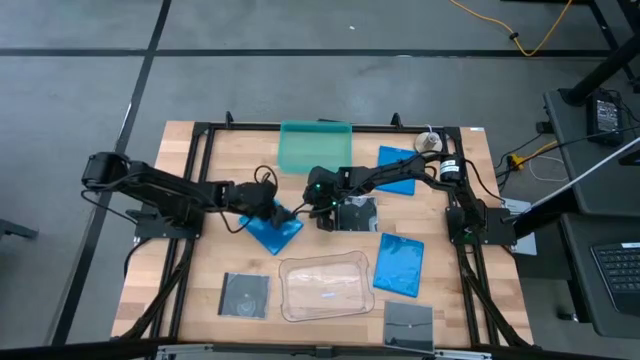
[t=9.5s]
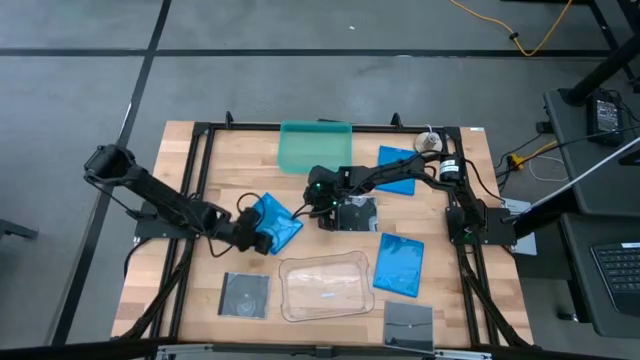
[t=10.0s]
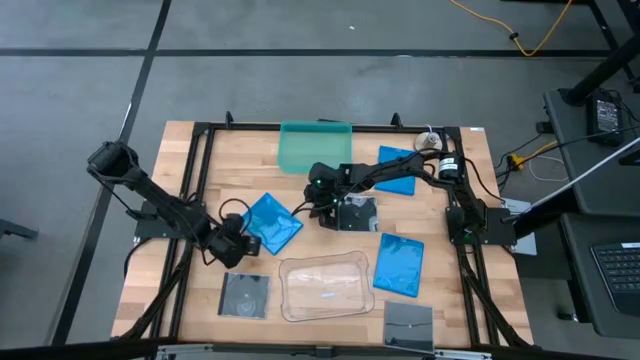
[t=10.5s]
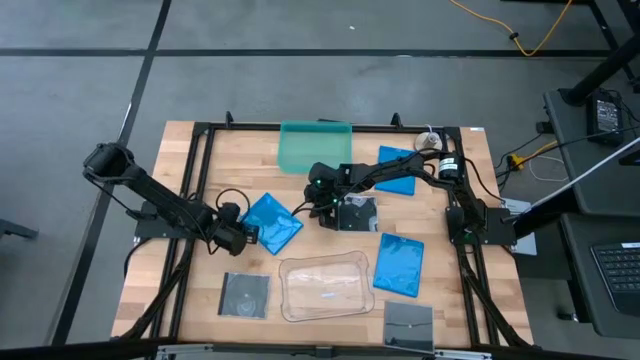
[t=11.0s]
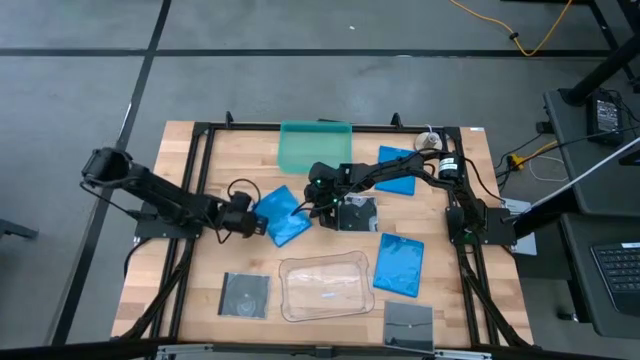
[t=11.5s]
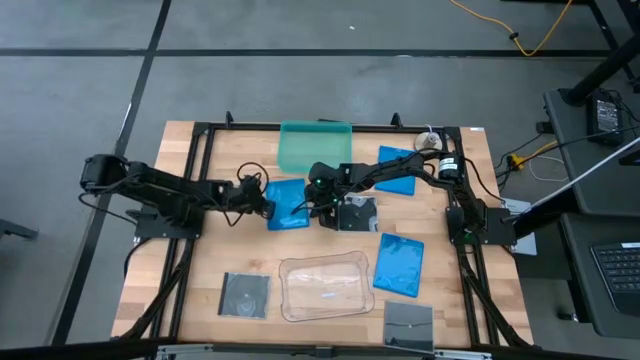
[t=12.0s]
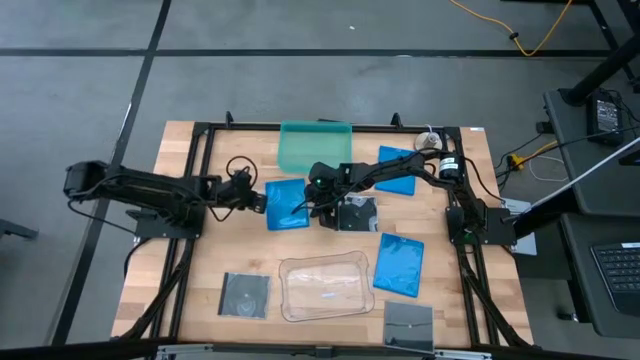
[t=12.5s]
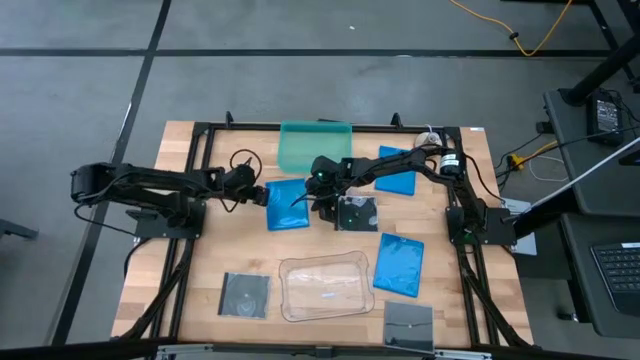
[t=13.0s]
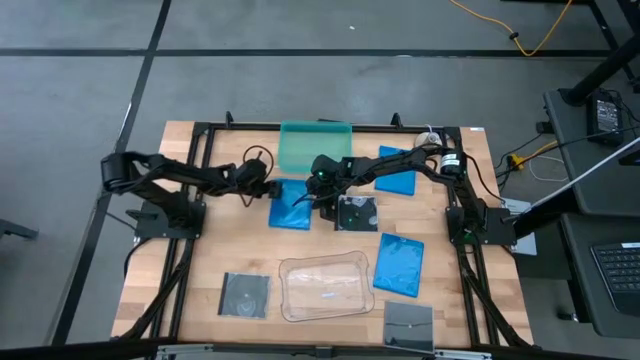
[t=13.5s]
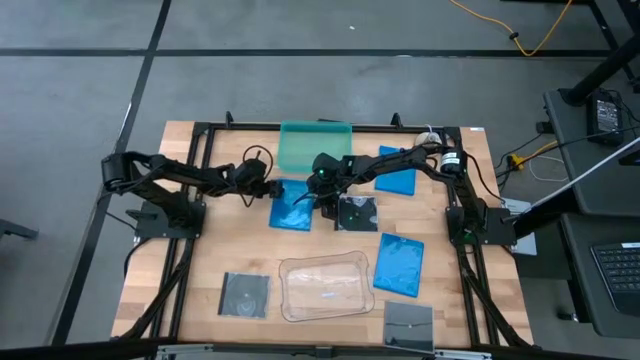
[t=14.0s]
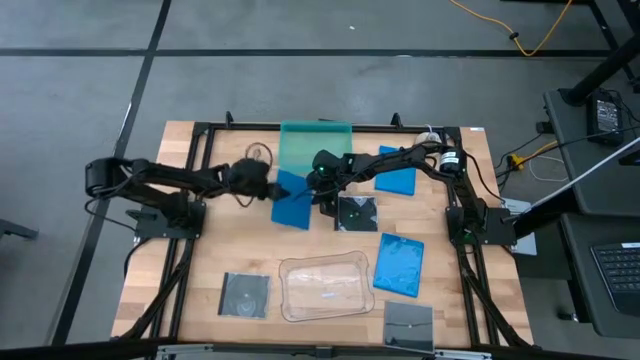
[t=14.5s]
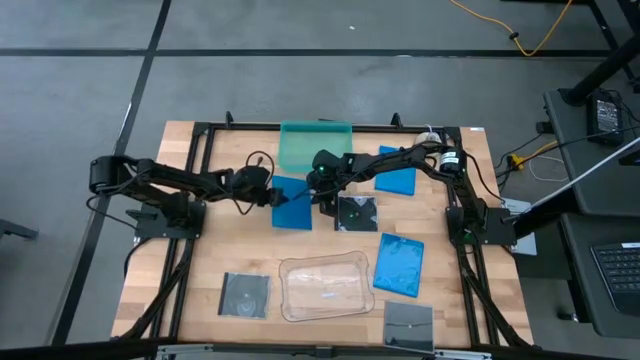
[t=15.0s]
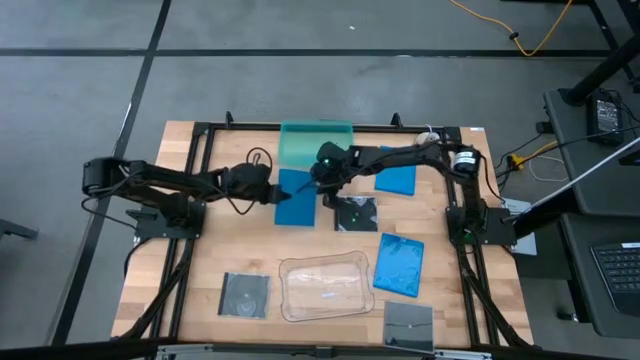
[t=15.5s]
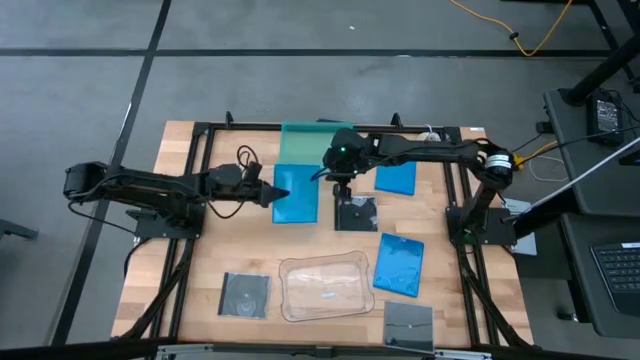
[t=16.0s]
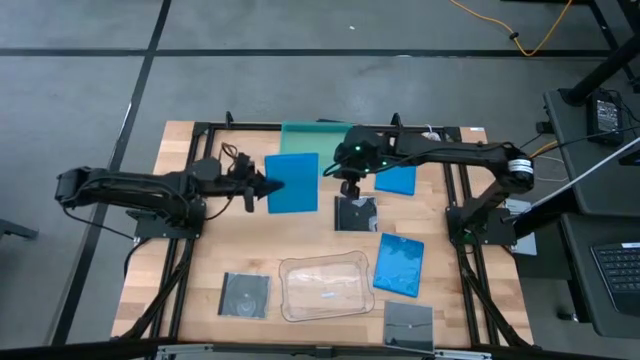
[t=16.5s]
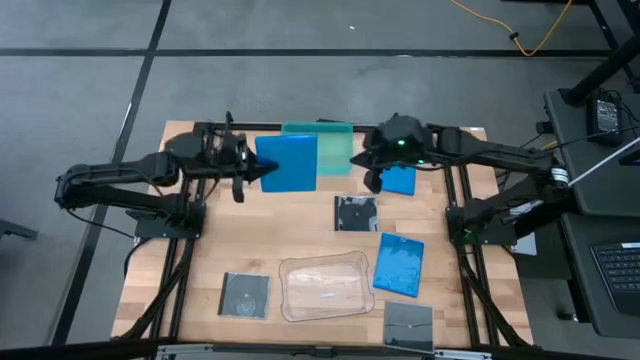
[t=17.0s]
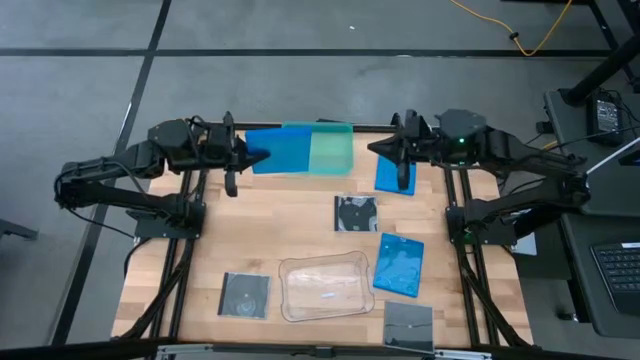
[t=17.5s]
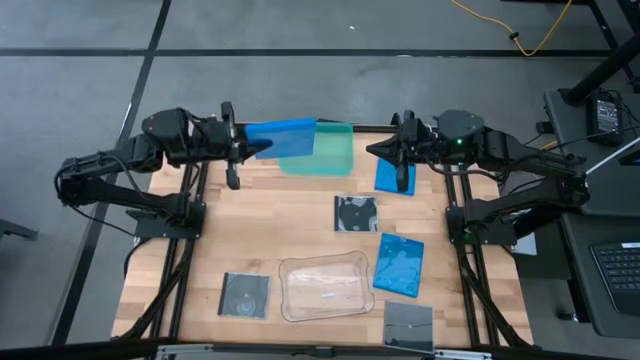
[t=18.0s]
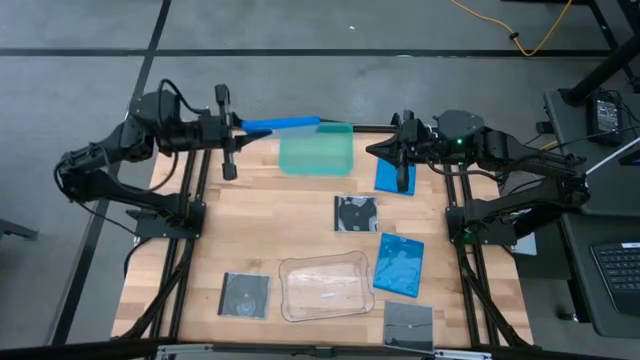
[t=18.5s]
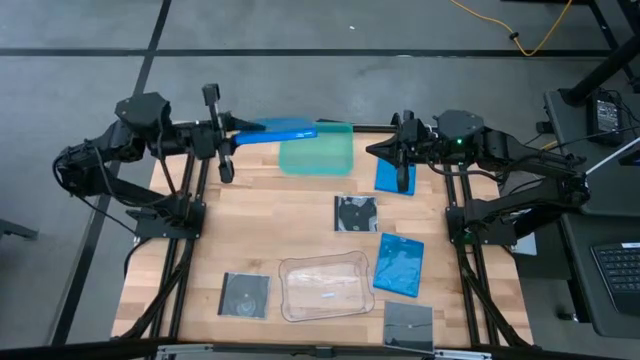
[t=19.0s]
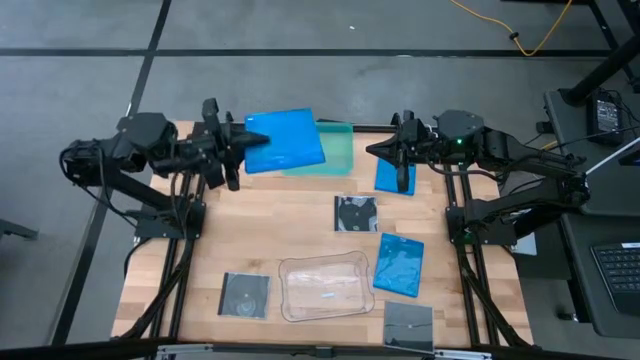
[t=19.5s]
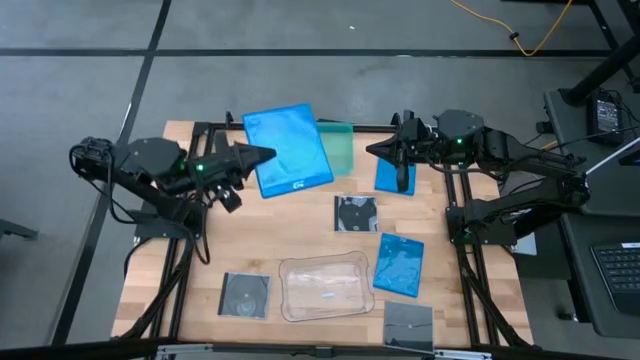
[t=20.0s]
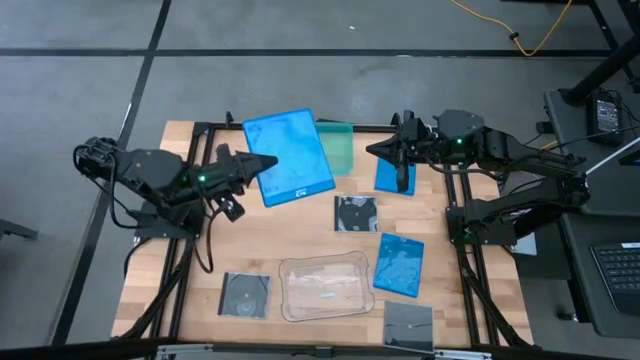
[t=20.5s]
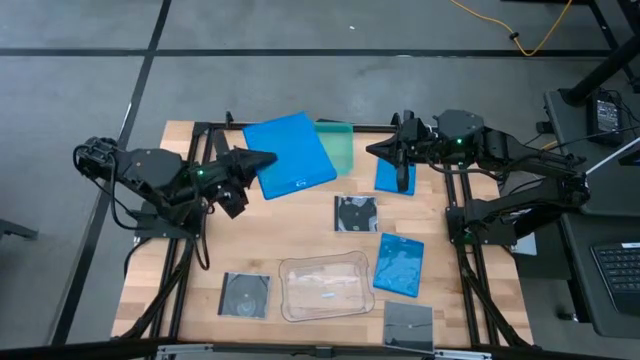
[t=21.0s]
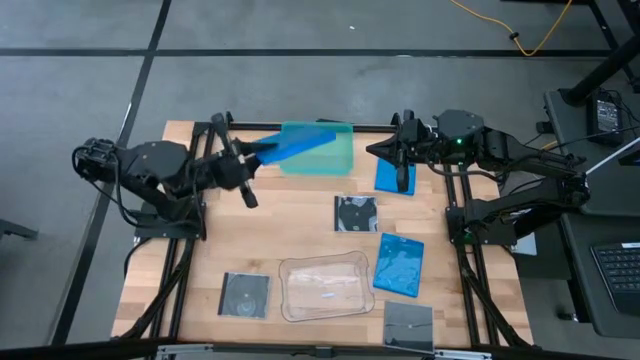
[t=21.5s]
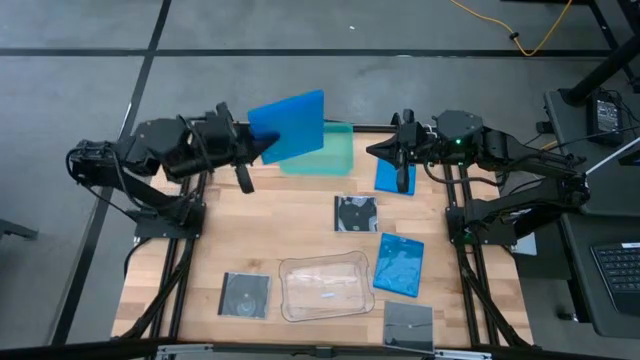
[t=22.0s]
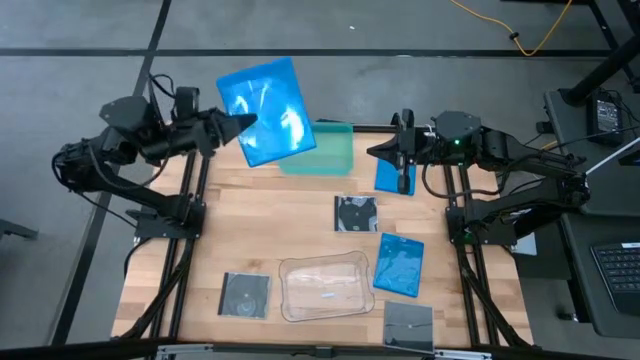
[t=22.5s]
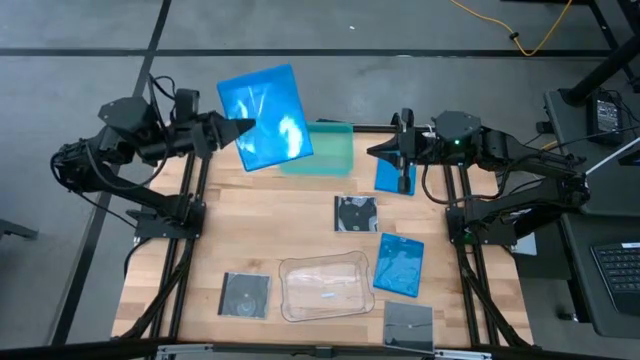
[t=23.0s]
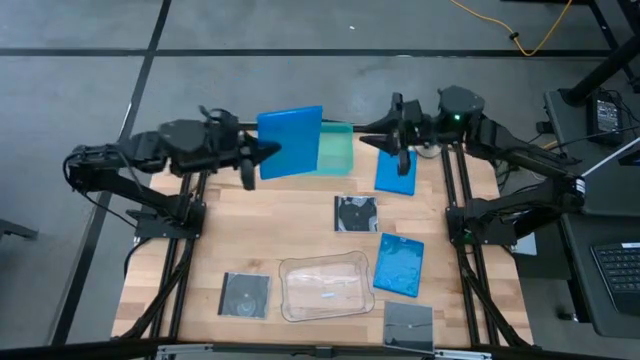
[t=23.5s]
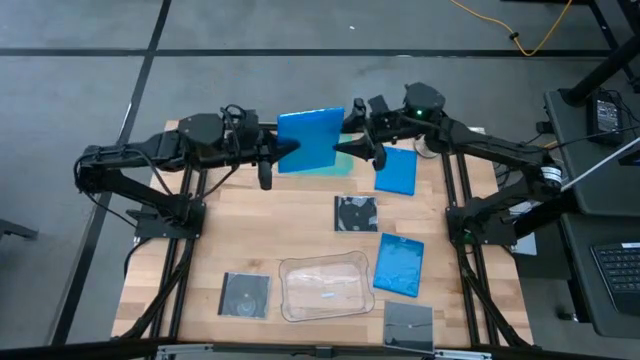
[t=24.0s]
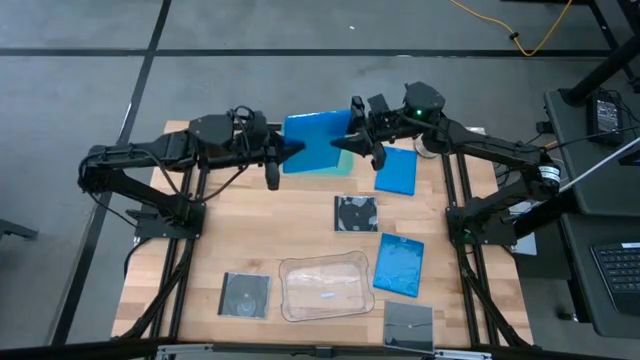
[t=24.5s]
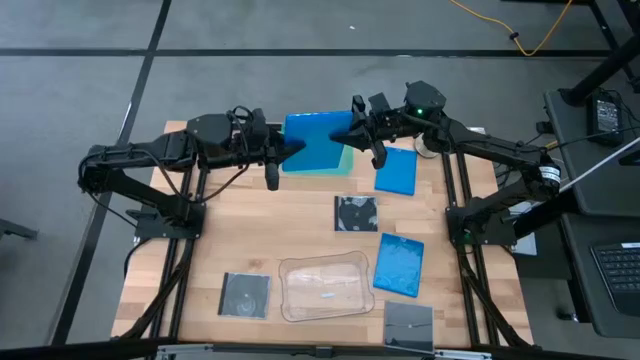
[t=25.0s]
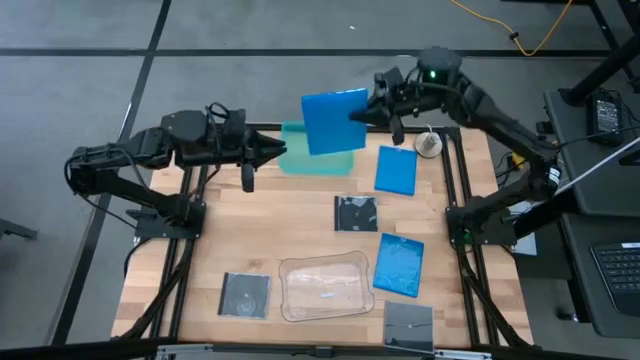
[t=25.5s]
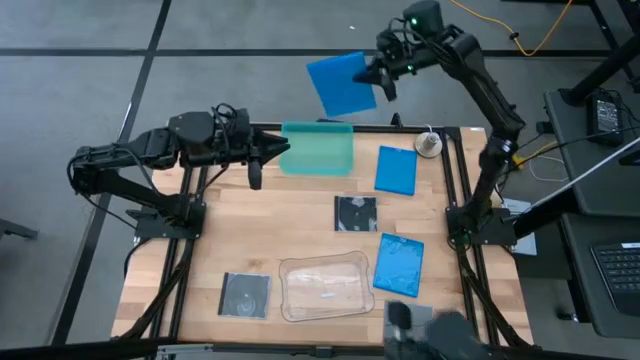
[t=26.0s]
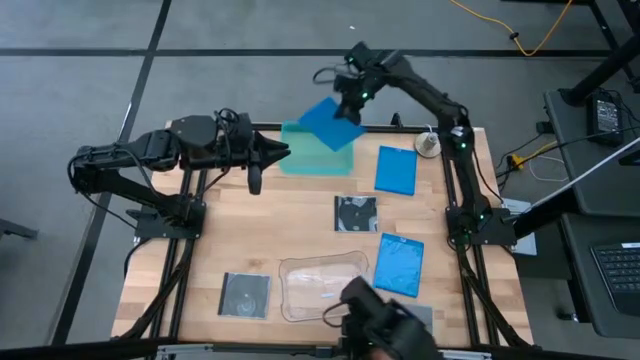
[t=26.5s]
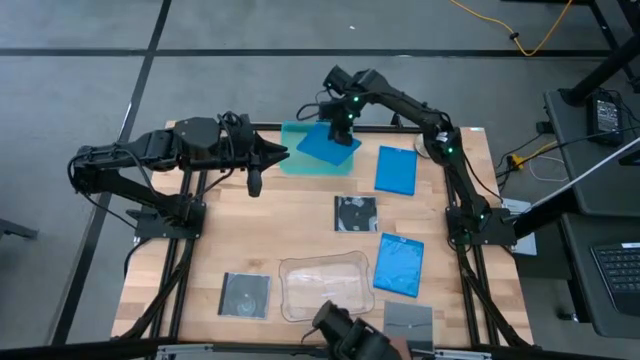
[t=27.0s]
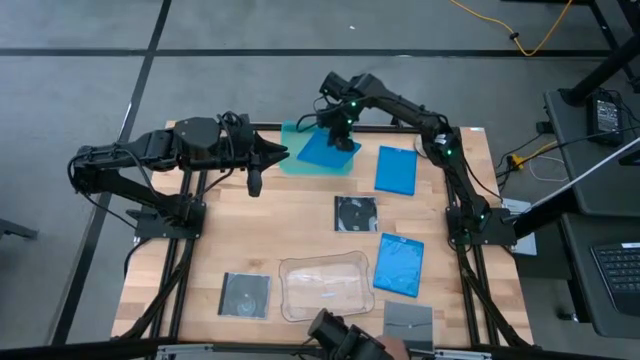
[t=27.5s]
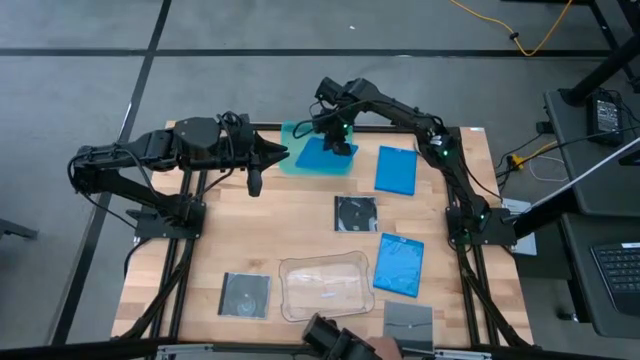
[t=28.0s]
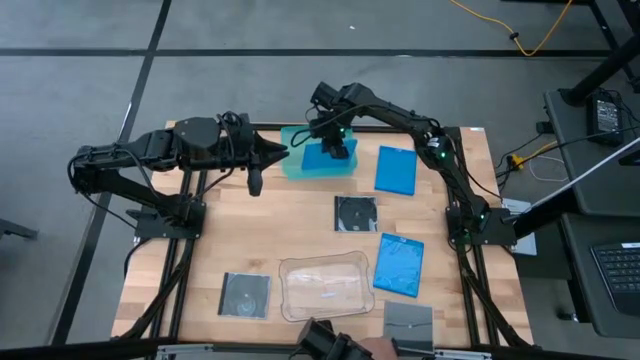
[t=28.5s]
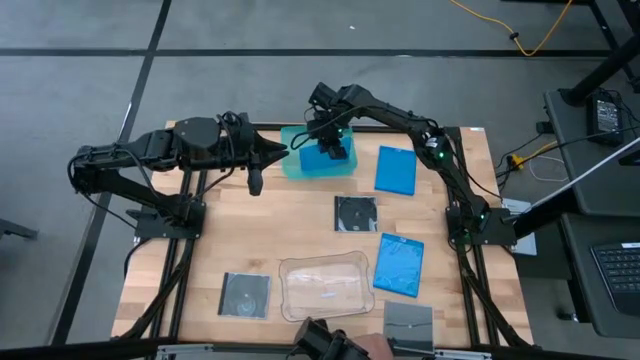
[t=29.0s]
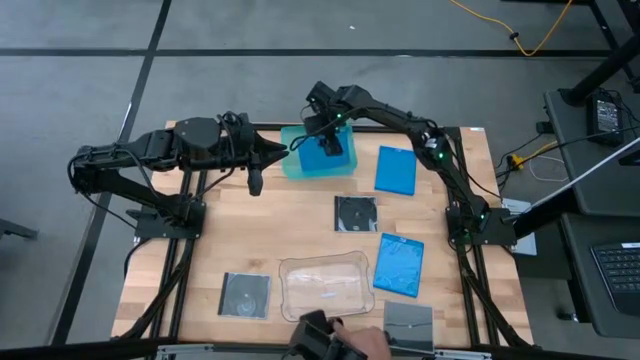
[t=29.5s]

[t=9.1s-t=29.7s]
Task: Pick & place jewel cases by type
Put the middle left blue CD case into the green bin
